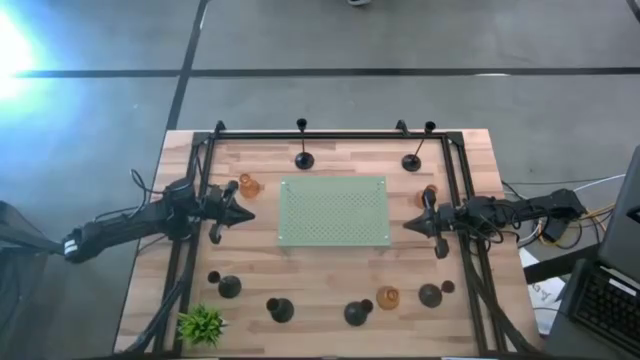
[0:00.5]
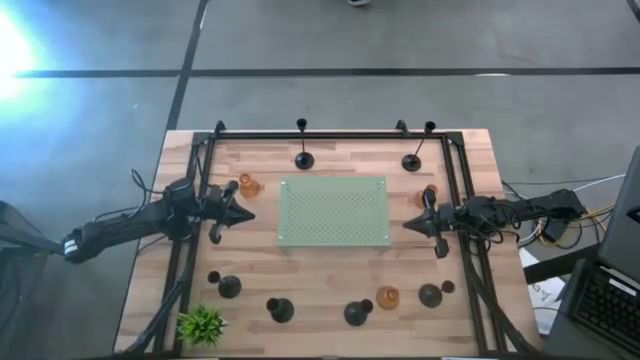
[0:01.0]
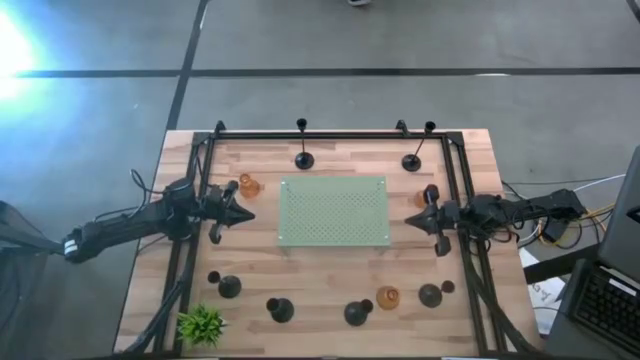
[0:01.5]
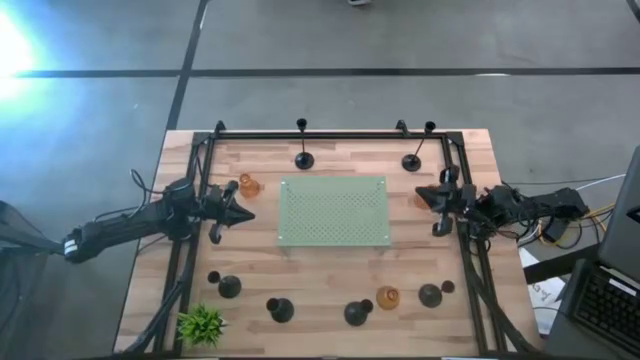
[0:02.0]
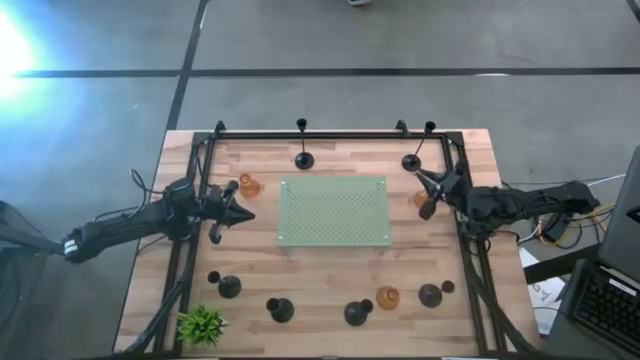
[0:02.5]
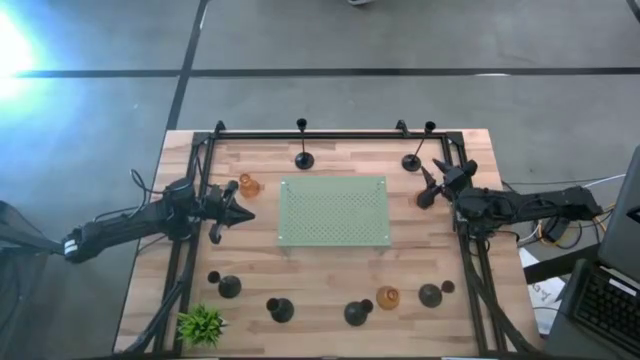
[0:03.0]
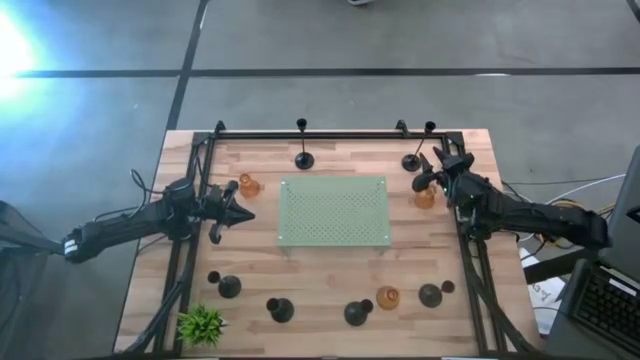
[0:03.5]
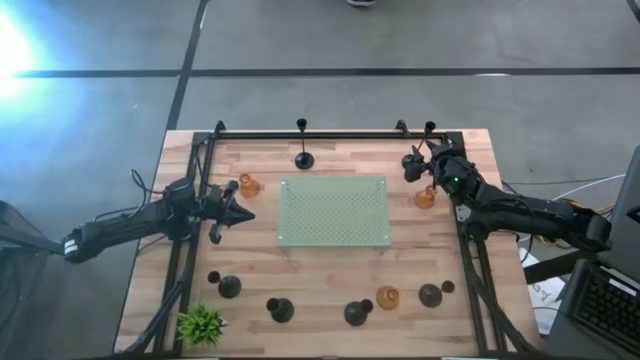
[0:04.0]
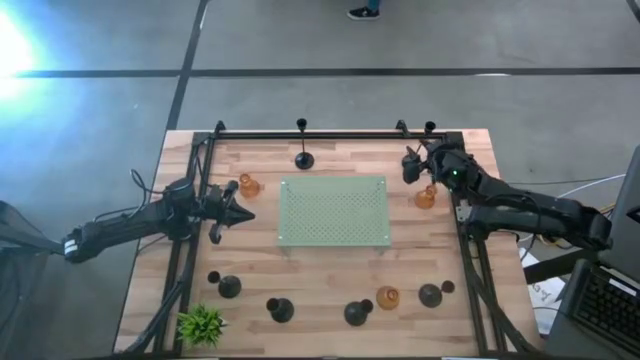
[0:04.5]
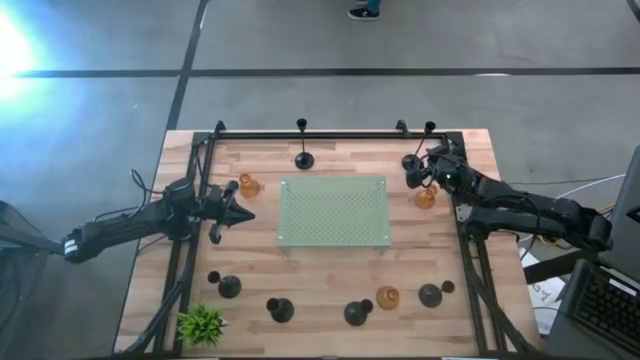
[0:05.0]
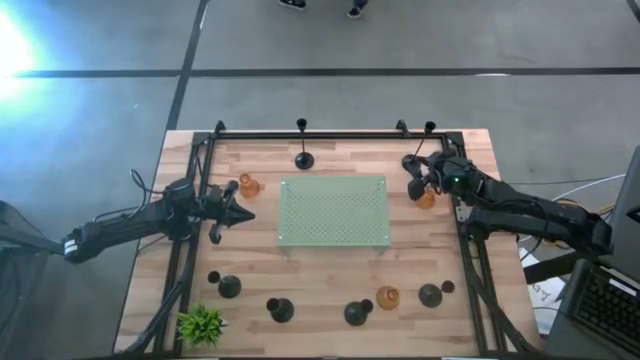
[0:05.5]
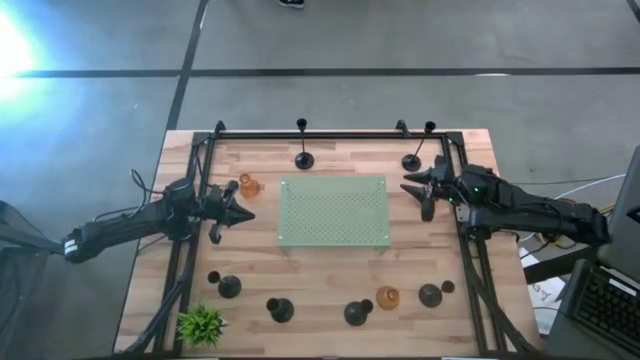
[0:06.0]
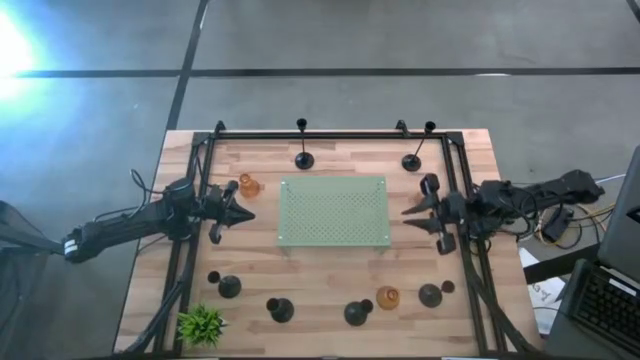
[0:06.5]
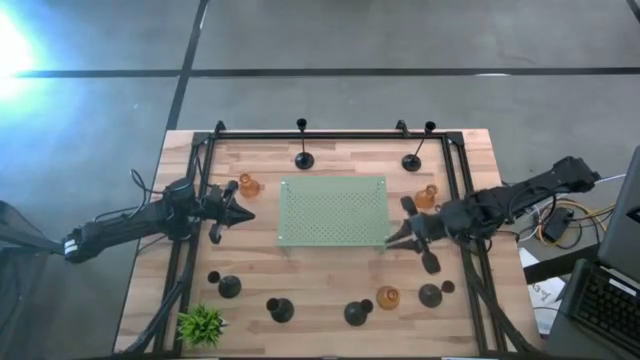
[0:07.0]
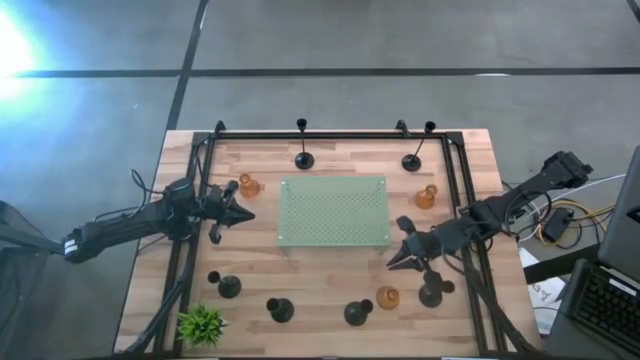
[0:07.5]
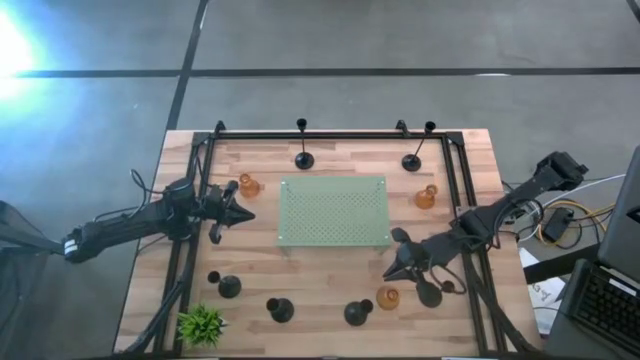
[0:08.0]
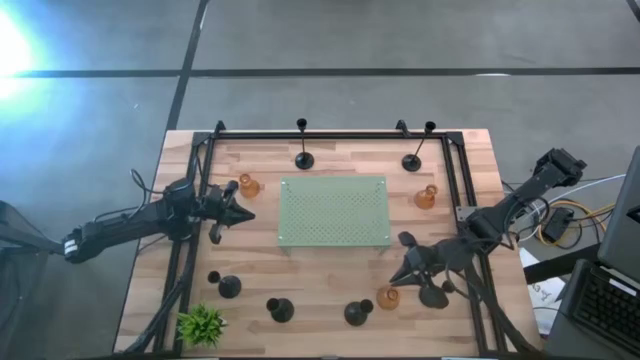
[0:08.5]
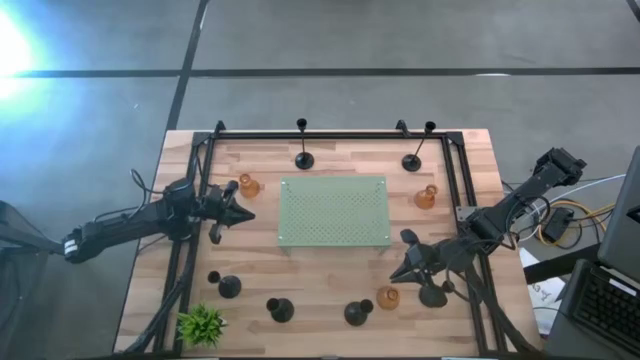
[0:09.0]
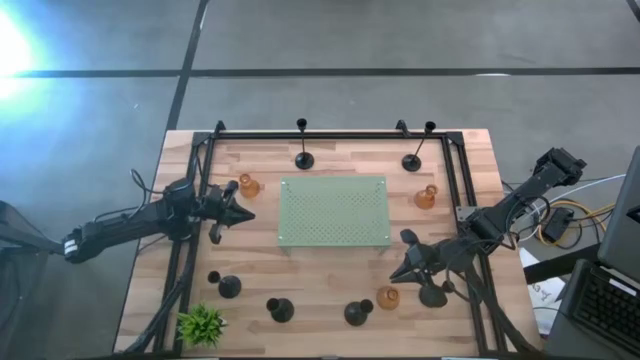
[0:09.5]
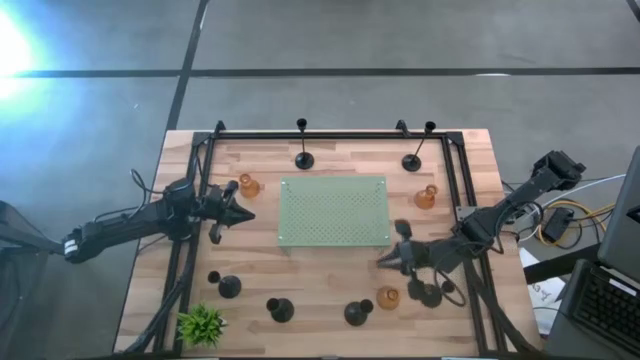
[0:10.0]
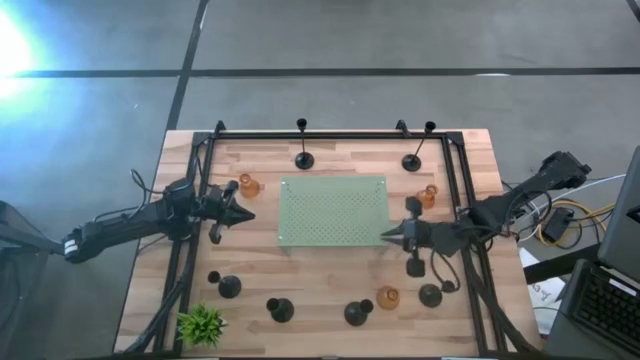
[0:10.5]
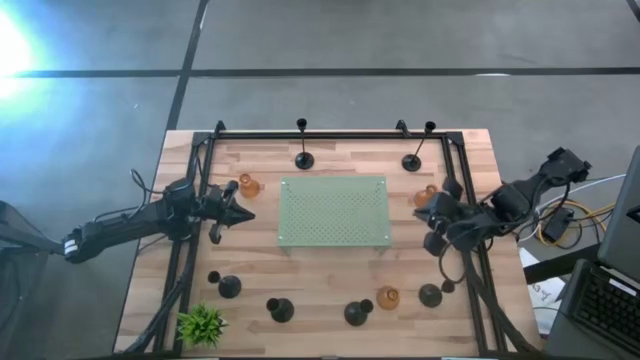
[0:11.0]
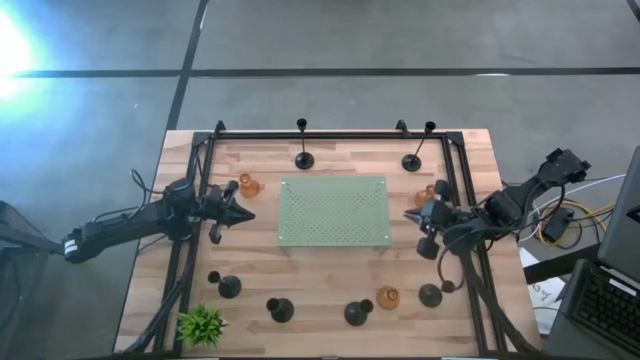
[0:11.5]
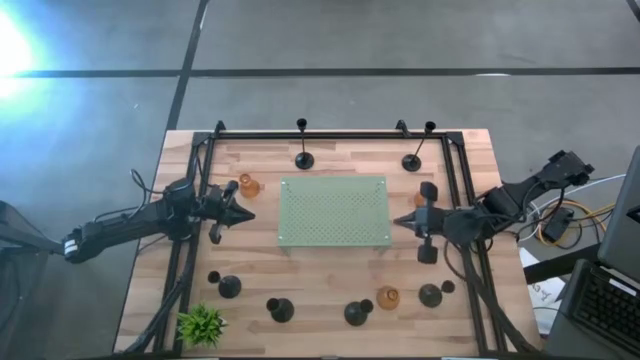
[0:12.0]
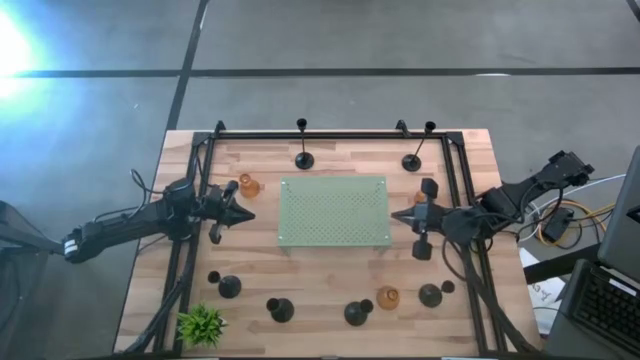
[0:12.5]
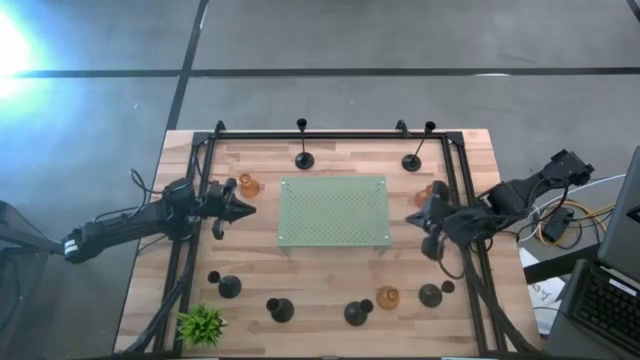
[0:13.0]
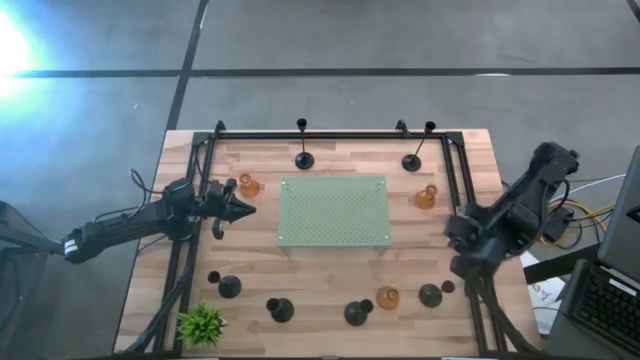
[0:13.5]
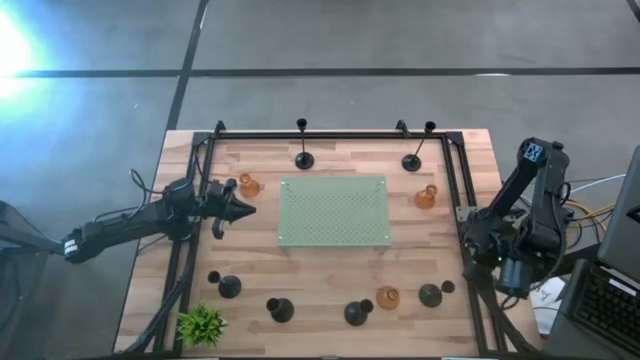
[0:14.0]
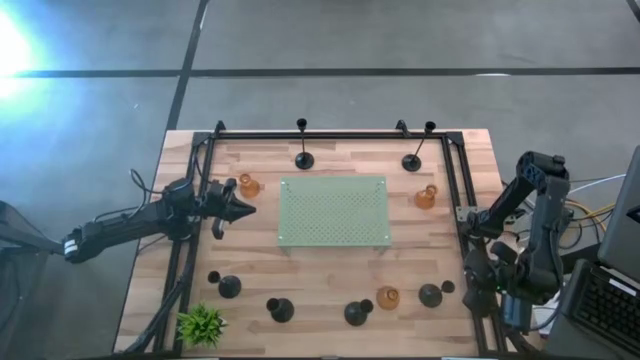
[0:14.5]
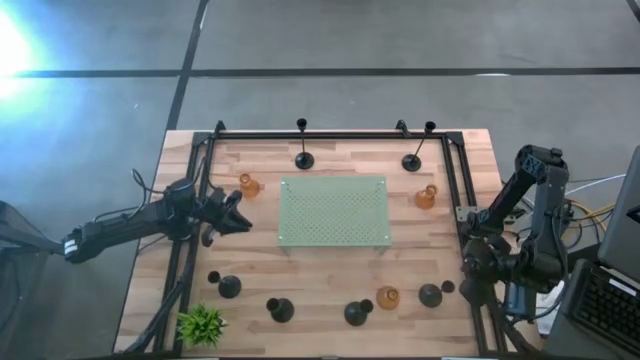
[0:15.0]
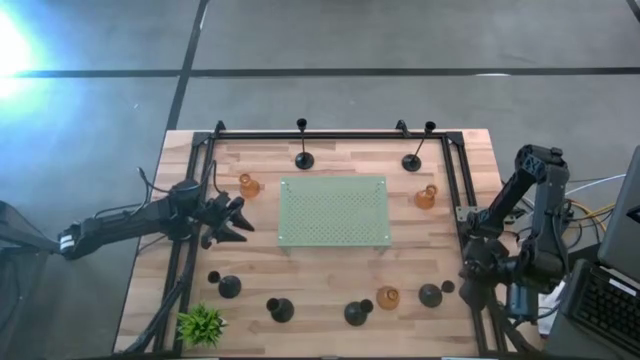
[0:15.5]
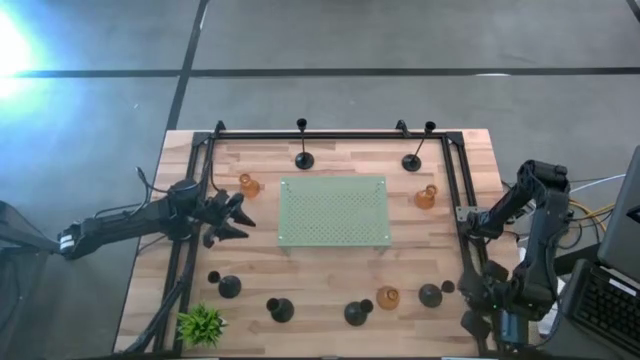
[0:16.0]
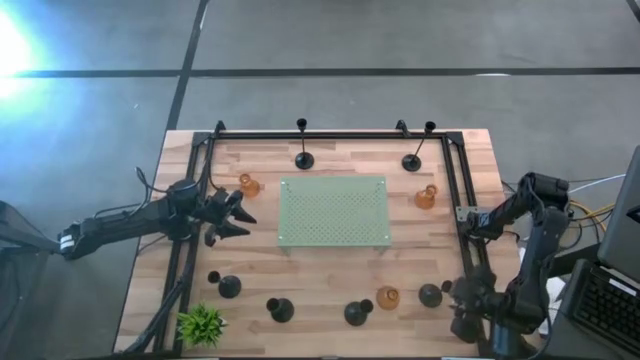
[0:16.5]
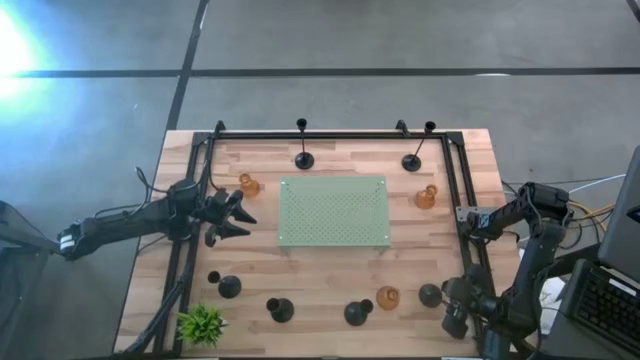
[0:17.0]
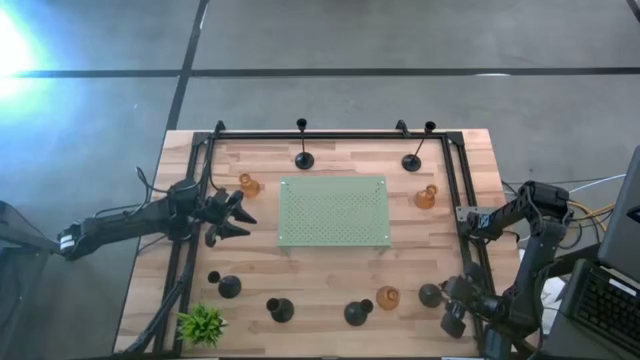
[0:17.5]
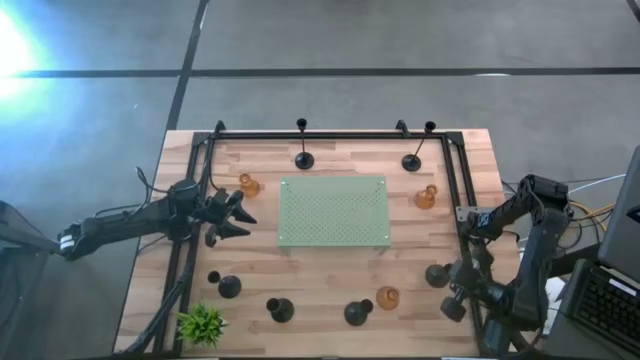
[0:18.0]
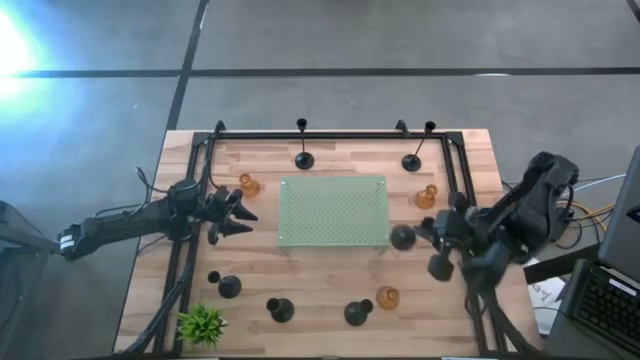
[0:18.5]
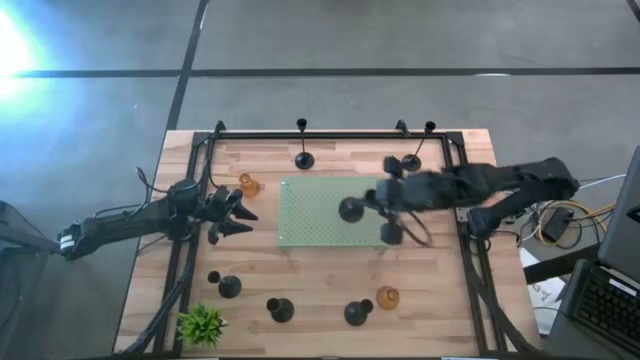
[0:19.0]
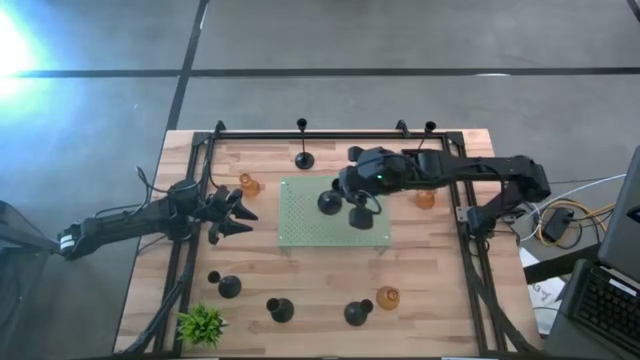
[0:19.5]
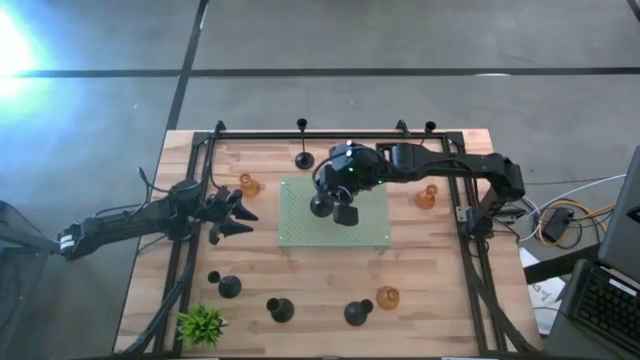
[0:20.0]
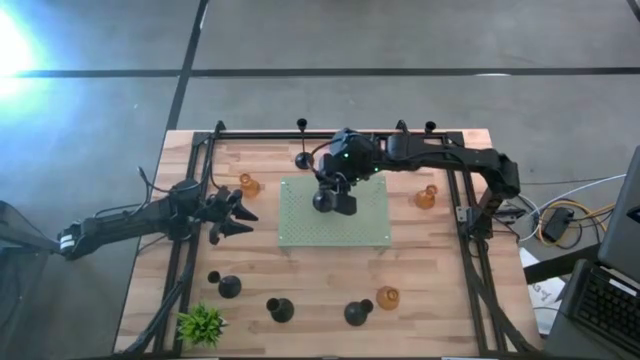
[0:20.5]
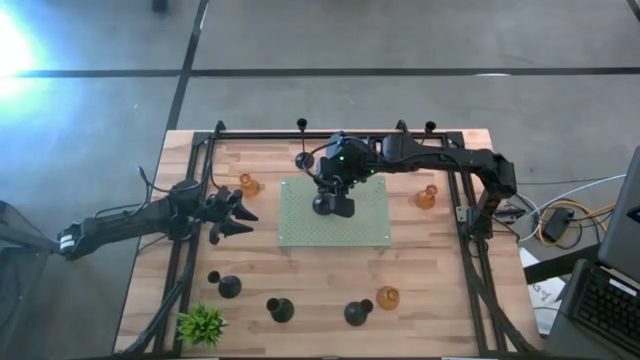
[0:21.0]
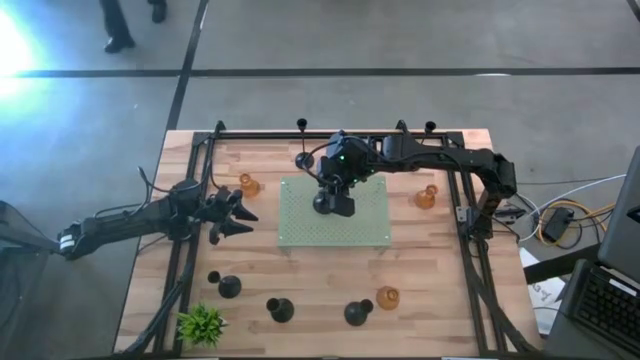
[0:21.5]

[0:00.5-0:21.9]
Task: Pick & Place candle stick holders
Put the black candle holder on the shelf
